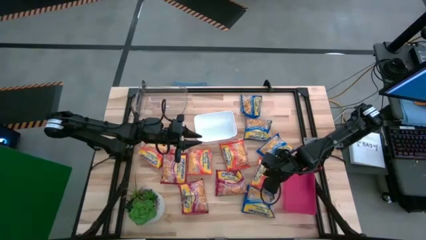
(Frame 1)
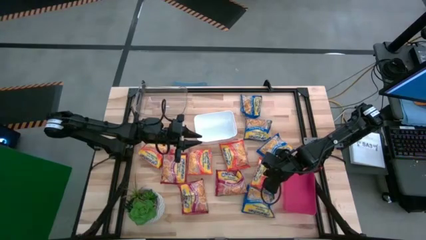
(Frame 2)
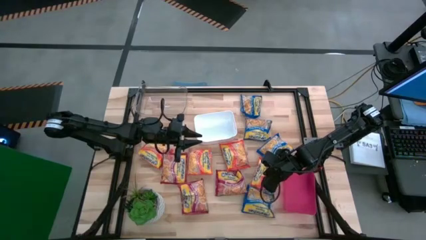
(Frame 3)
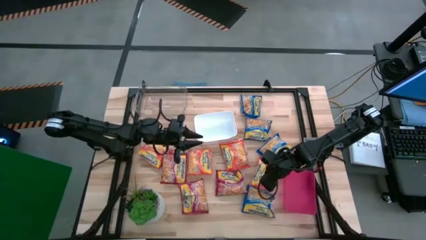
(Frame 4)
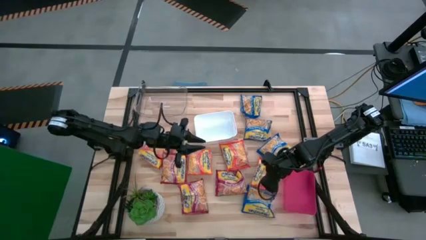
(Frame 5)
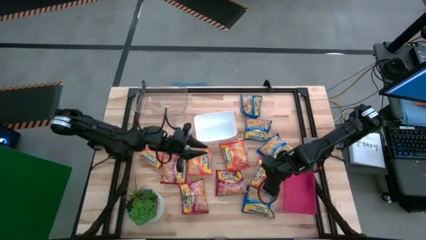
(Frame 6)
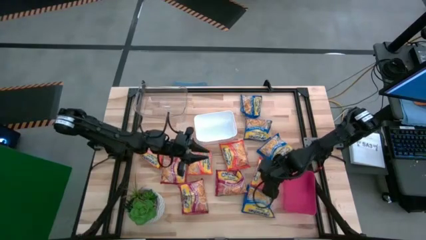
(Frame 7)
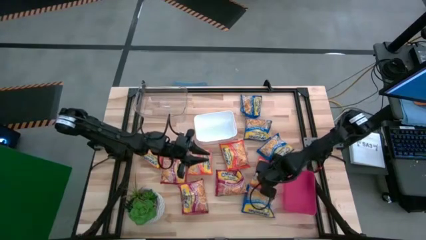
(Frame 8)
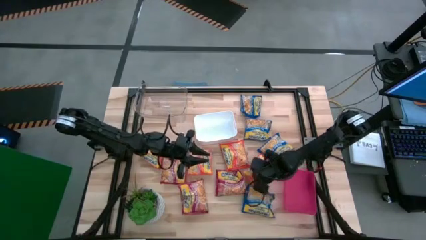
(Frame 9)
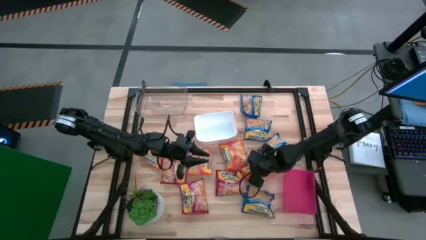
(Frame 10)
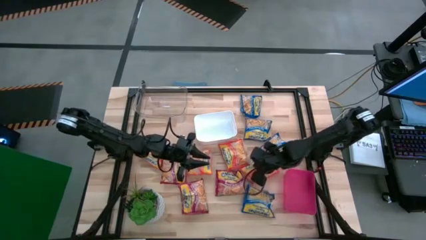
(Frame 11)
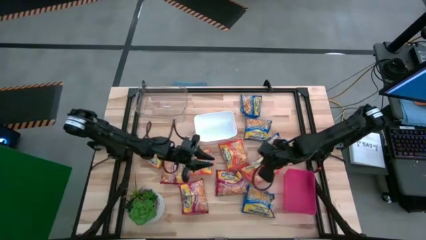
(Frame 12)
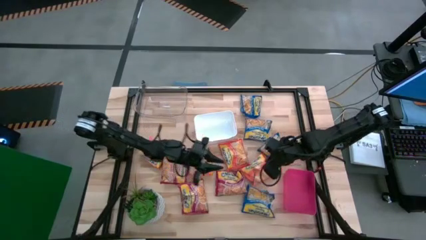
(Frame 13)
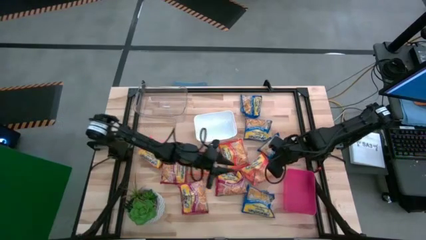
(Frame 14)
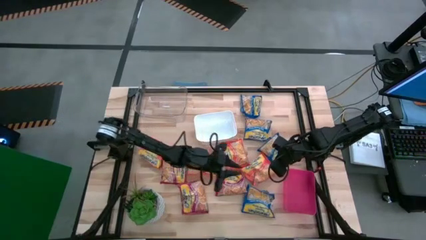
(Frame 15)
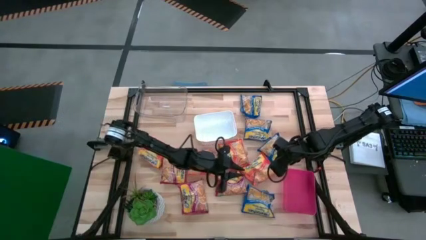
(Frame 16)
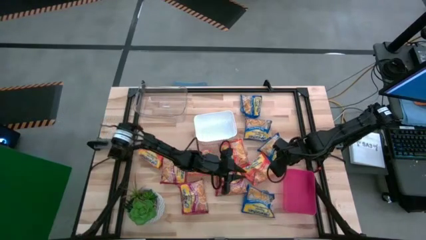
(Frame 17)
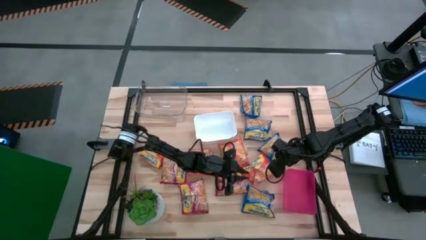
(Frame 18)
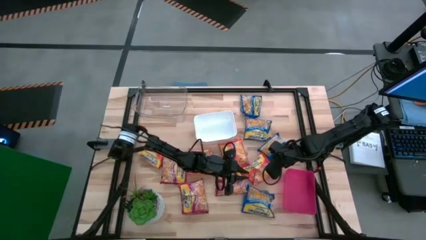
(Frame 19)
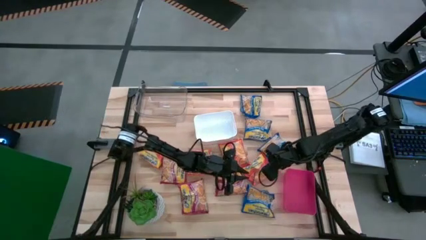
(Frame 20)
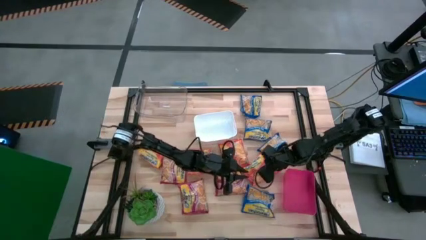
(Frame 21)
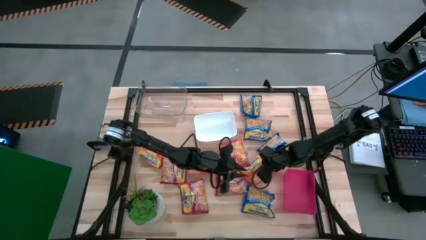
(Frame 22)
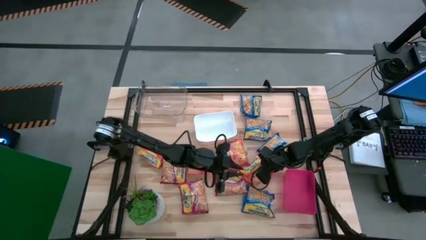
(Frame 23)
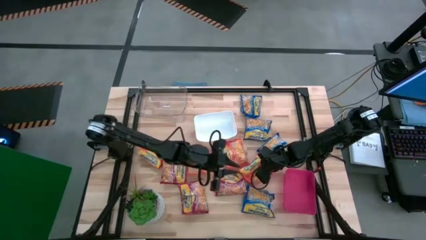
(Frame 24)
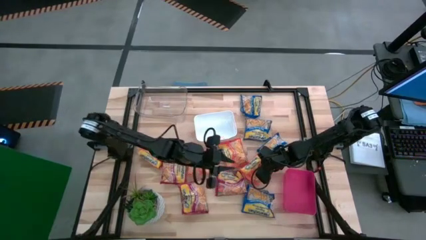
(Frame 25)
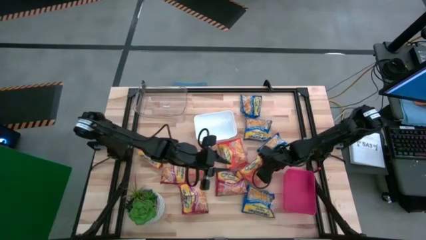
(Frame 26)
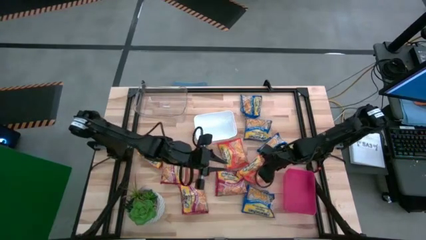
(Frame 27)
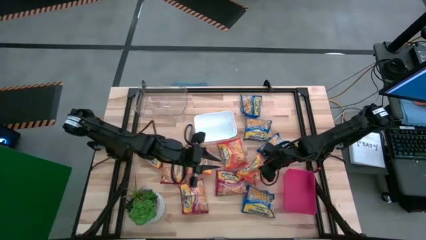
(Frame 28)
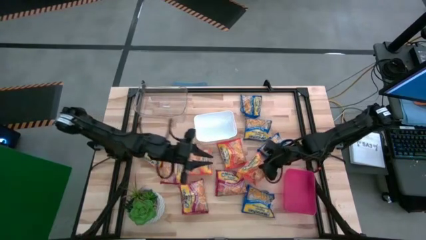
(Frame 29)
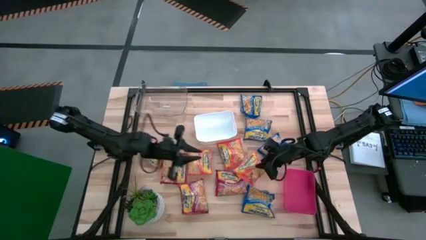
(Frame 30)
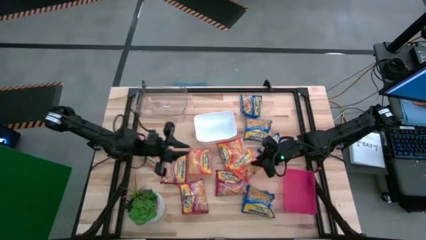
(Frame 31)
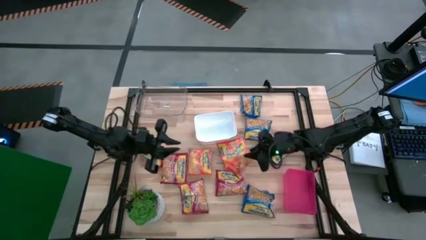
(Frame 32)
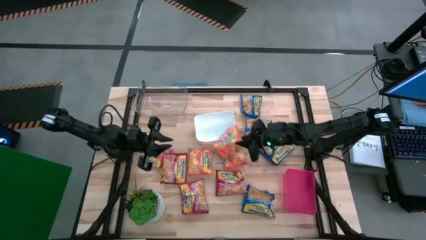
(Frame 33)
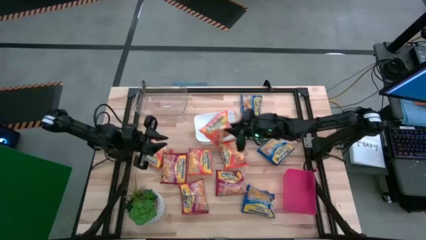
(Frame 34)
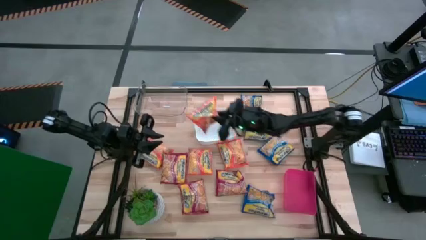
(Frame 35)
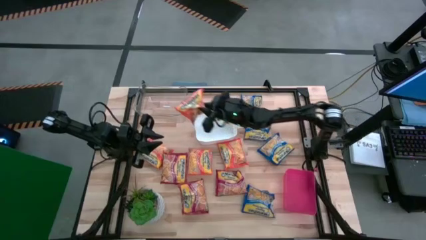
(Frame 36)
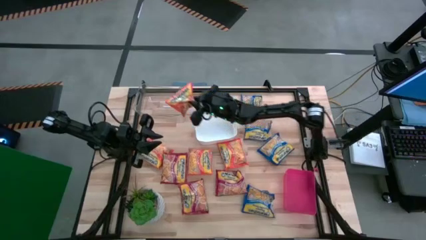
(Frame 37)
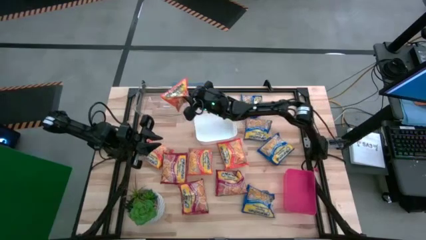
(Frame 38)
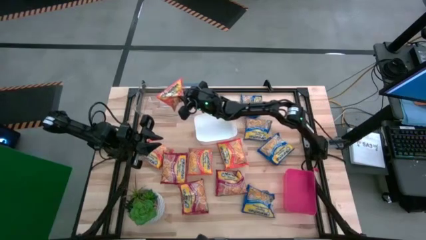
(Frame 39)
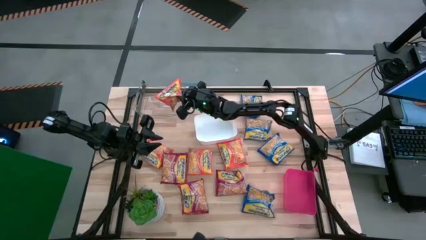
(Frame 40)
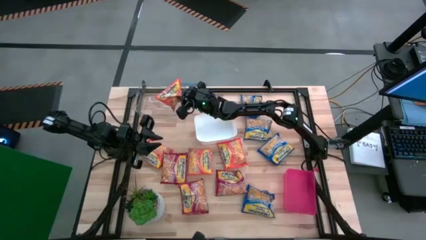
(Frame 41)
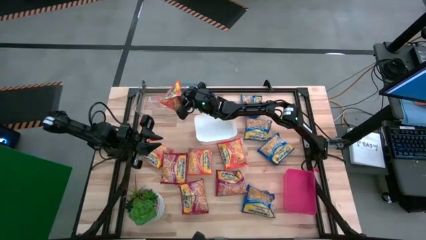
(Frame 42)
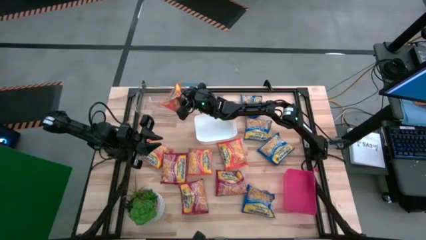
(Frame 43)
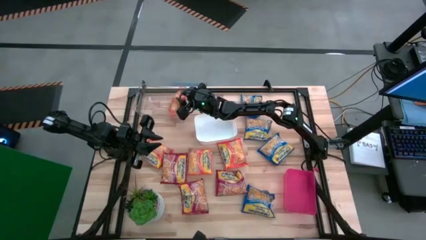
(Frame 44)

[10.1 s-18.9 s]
Task: Sort Maruchan noodles
Put the orange noodle pack into the transparent bin

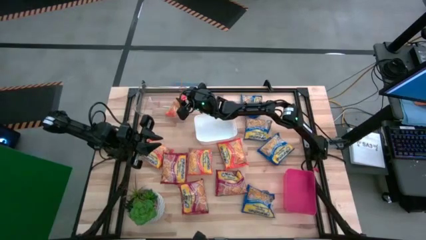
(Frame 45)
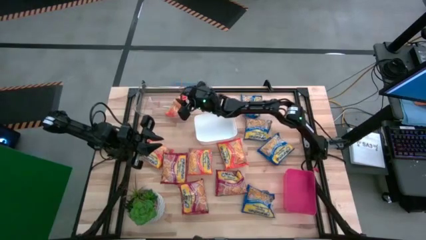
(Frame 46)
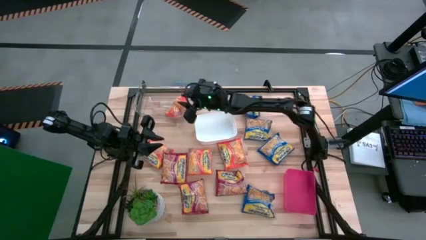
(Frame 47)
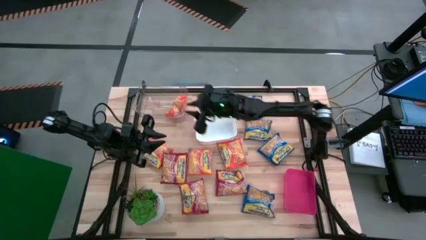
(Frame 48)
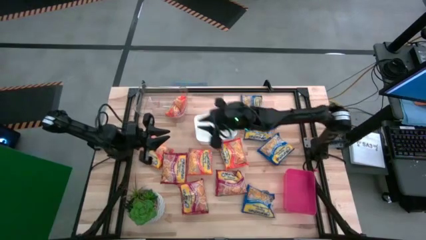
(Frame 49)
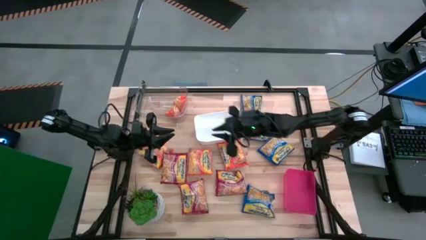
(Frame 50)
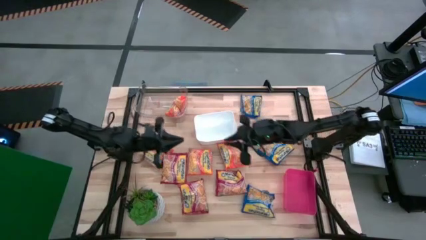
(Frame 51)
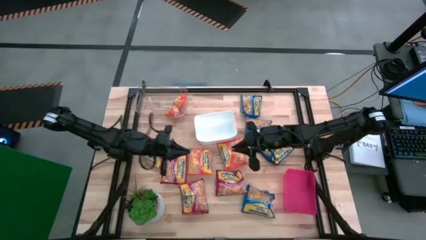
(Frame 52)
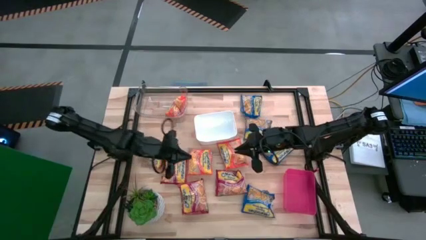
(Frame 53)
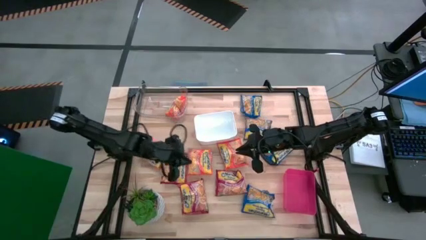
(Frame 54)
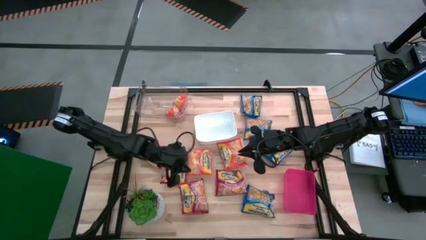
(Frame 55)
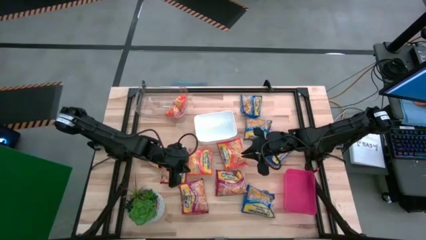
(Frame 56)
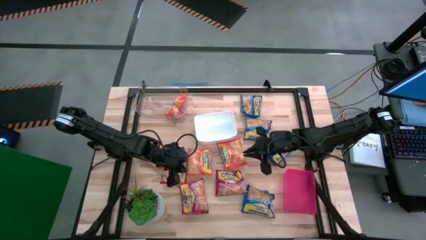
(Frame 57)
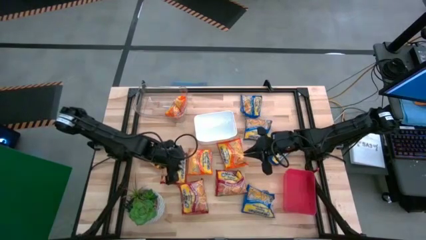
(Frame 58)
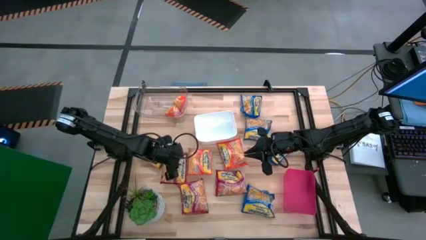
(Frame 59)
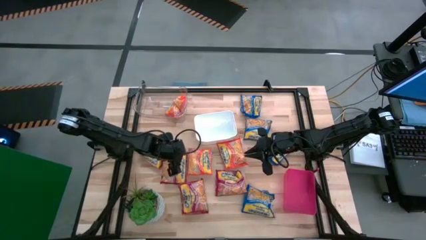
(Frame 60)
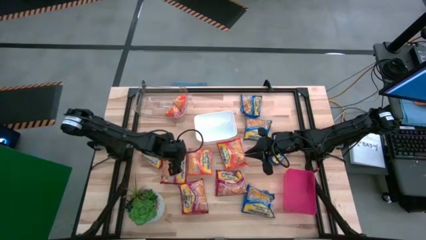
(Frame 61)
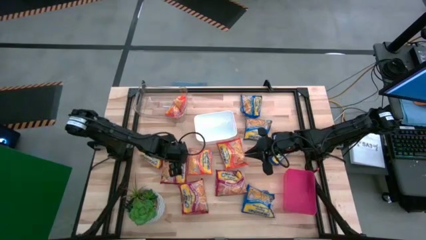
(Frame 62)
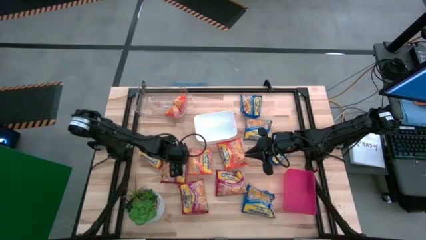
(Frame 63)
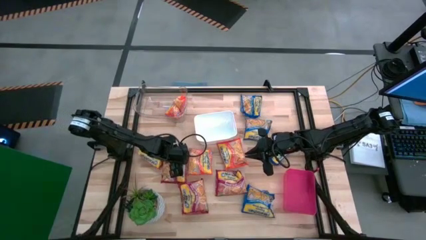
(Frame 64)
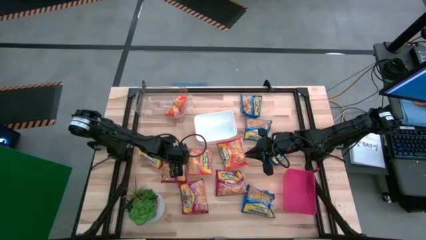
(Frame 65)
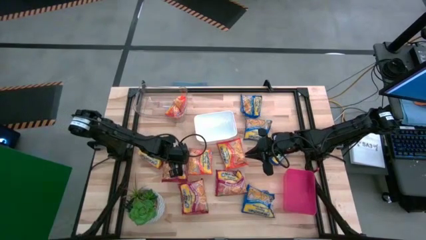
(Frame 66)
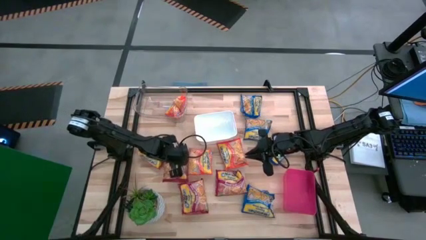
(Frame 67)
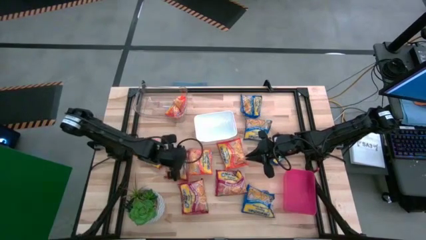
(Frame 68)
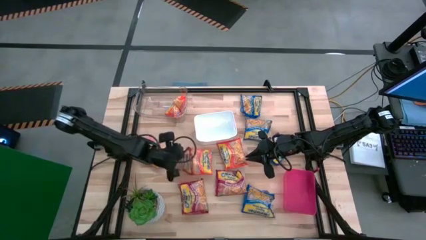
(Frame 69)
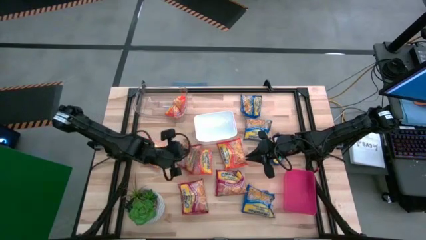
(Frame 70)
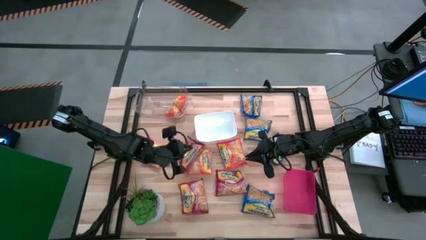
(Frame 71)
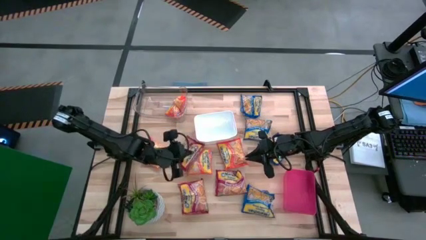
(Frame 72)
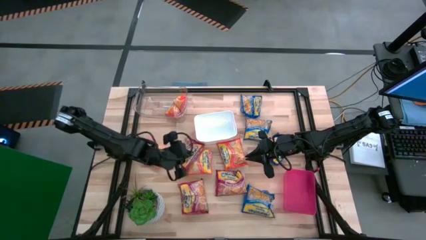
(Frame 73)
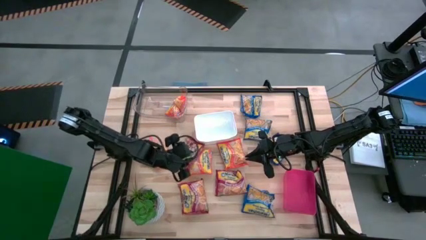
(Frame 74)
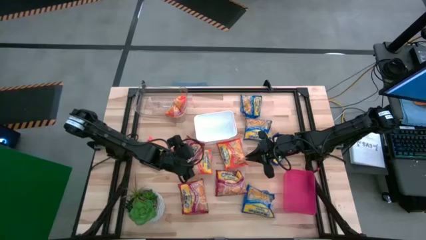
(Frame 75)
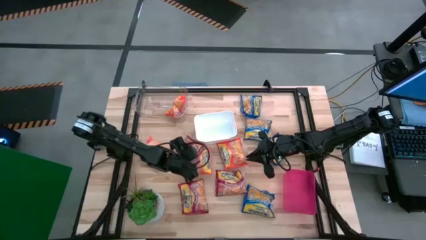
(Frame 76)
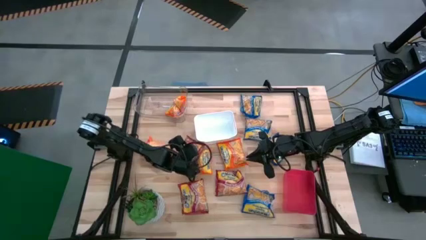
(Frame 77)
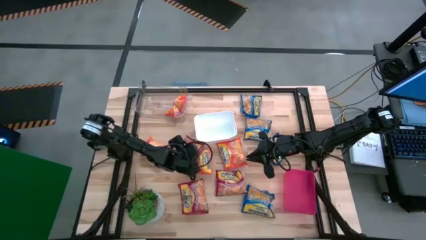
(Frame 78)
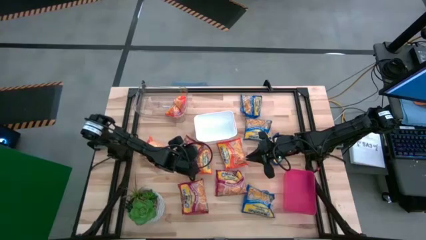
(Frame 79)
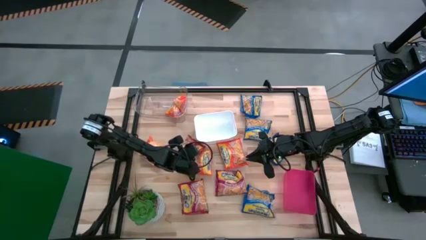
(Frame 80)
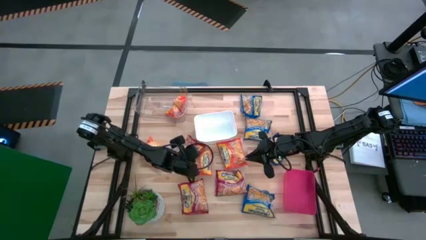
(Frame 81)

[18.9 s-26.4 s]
Put the red noodle pack into the pink bin

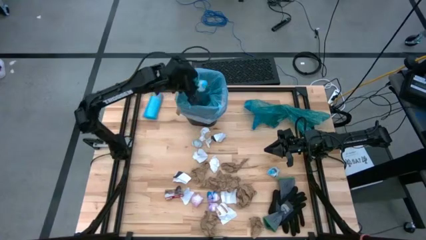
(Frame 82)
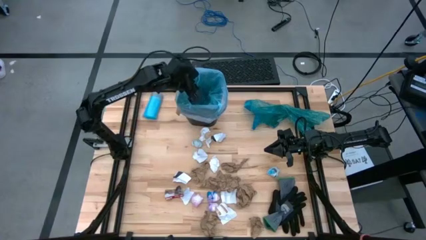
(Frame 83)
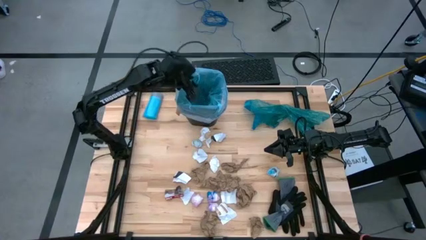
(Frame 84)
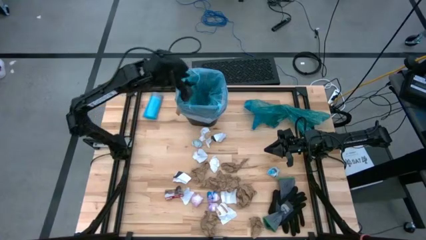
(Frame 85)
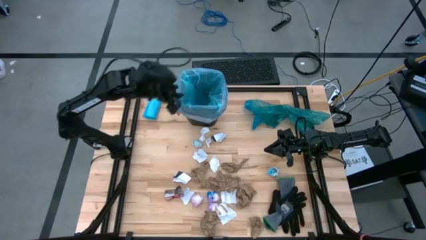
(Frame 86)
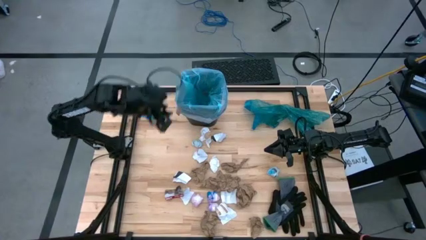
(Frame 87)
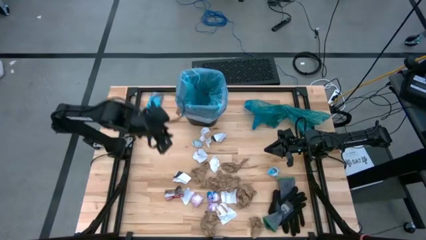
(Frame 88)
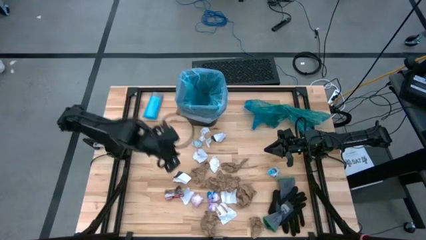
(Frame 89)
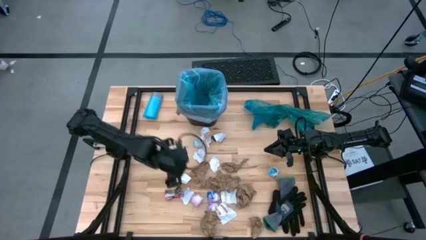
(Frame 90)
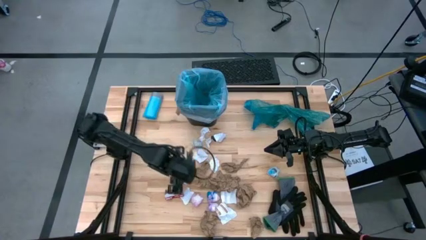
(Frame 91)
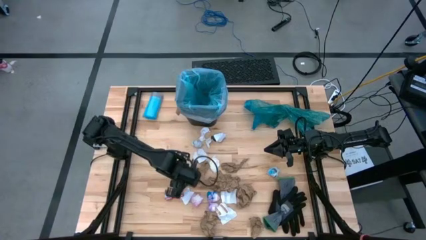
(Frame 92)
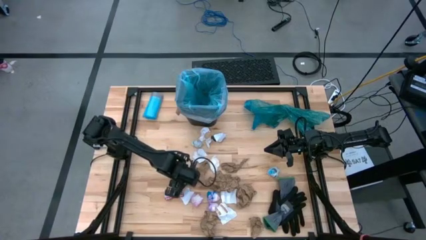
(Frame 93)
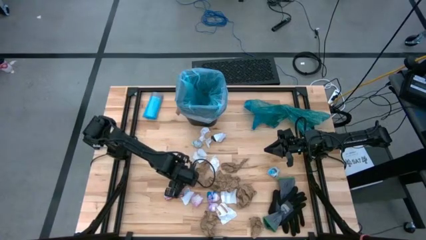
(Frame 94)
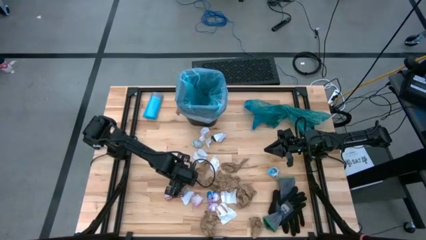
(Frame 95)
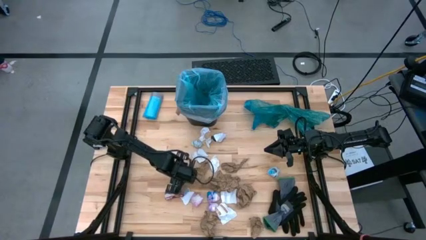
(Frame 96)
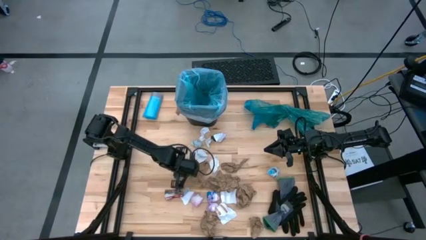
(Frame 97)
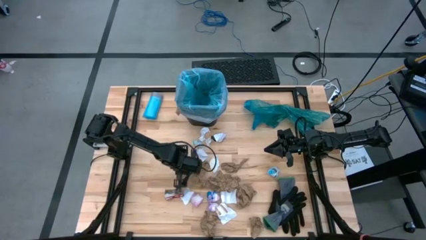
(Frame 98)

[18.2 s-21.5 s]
Task: place trash/remove bag and relplace
Put the white paper trash into the trash bin
